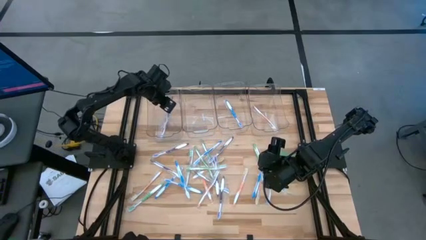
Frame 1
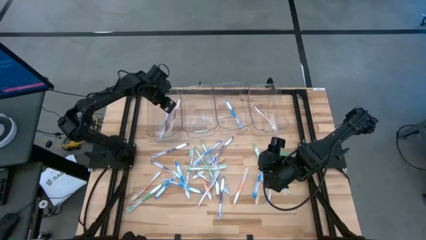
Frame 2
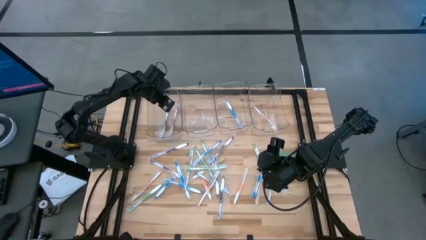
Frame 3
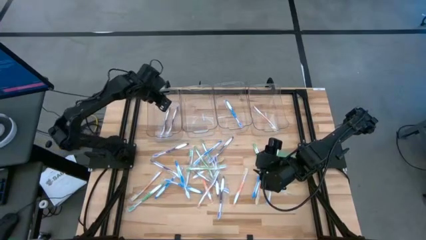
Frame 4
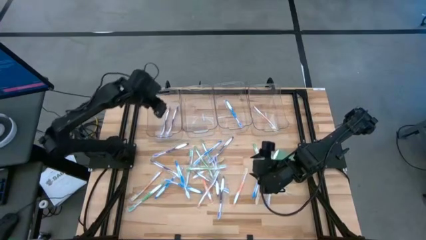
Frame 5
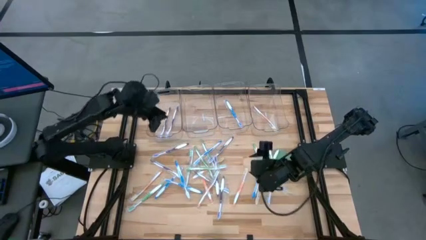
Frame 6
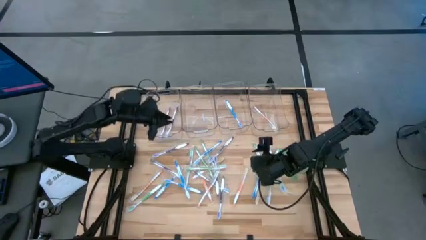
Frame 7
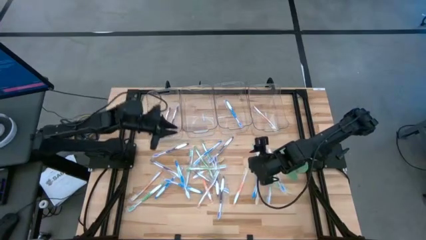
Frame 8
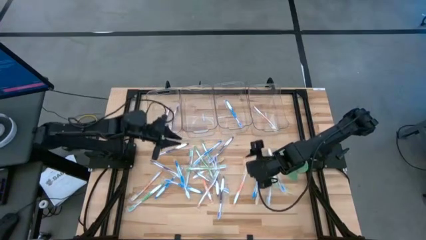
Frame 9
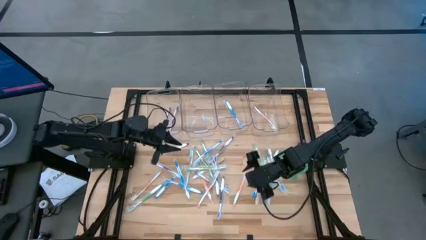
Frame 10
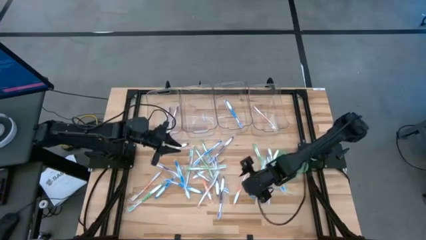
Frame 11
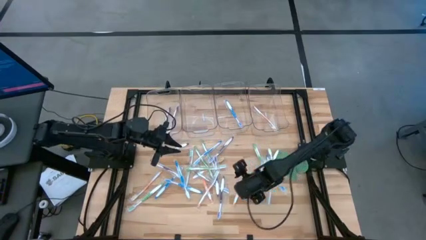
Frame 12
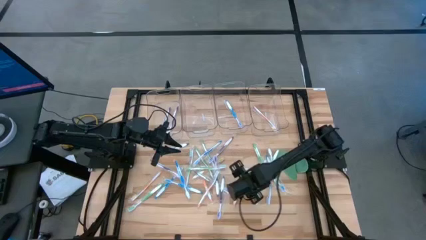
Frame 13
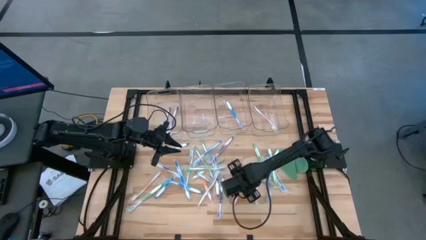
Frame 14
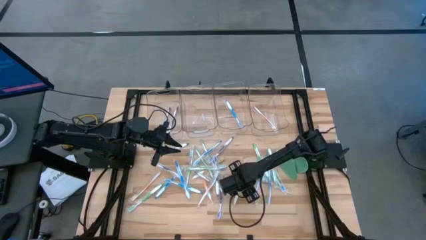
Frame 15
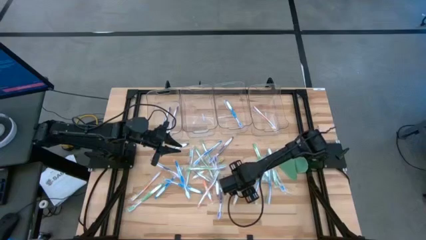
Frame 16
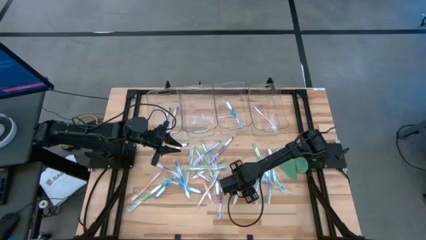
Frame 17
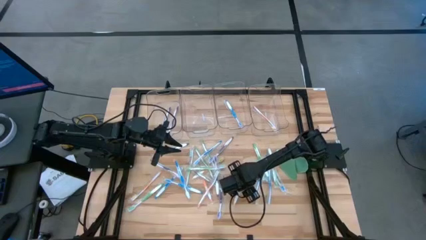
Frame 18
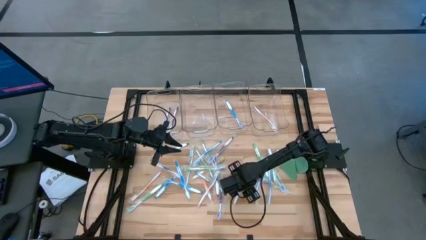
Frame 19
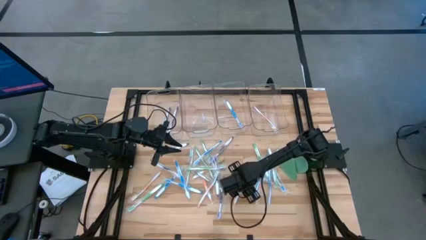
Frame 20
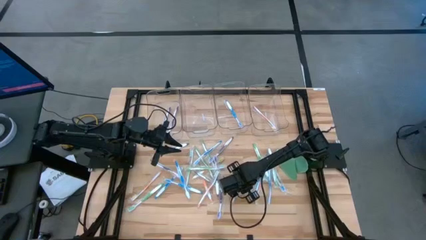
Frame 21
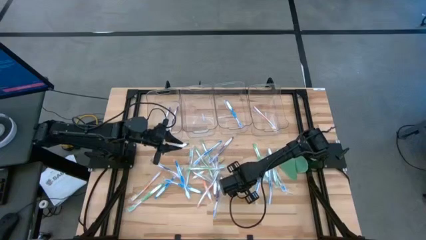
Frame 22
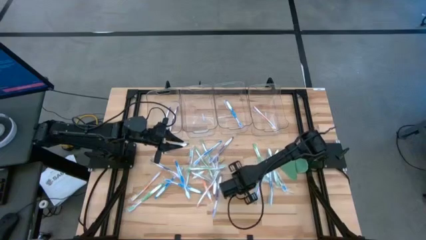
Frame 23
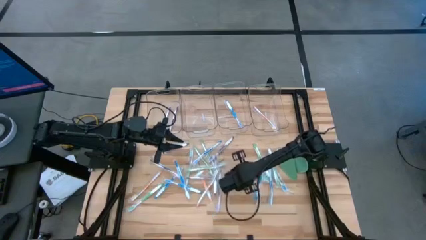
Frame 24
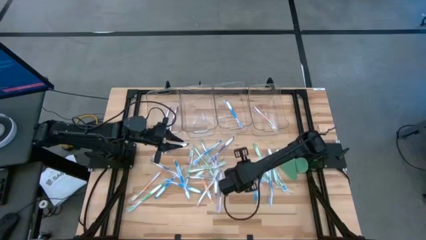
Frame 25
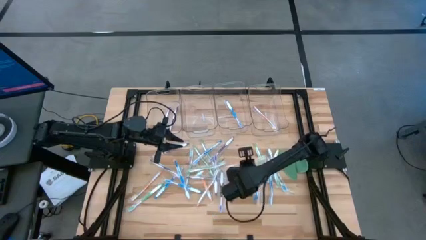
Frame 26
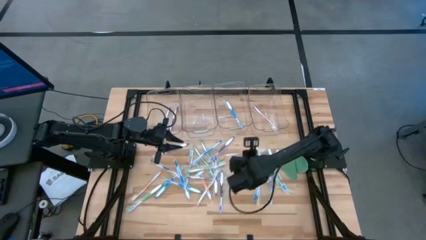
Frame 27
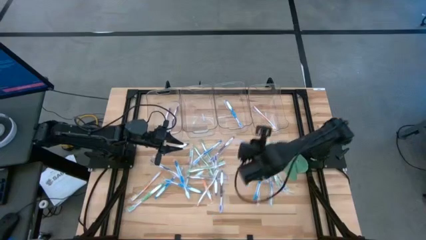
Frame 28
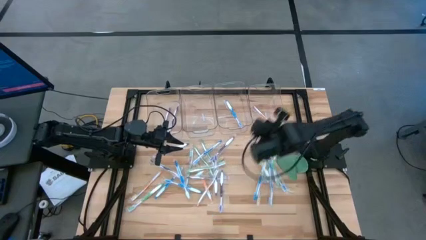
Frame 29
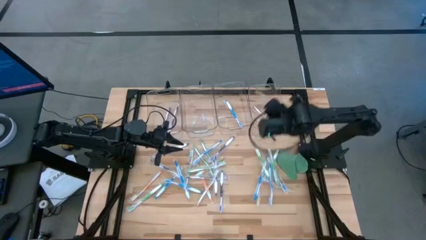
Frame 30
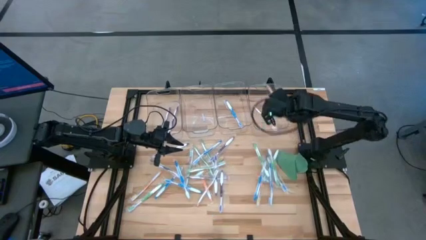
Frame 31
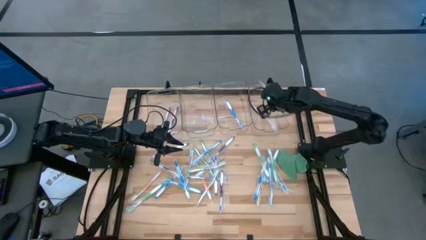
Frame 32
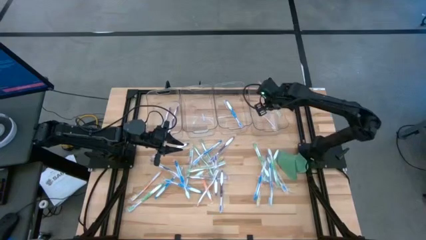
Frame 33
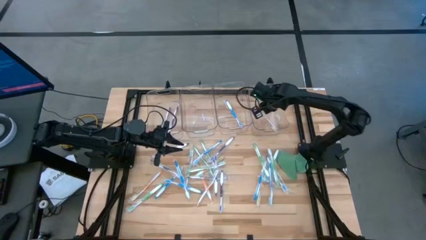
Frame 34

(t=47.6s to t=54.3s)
Task: Pick & Place Toothbrushes
Put the orange toothbrush into the right transparent bin

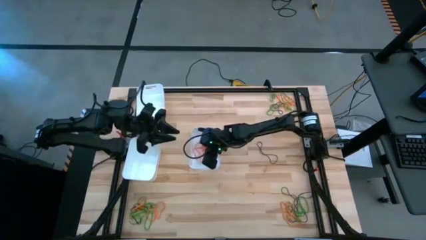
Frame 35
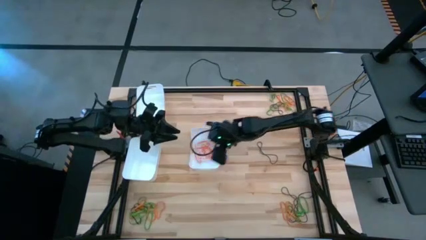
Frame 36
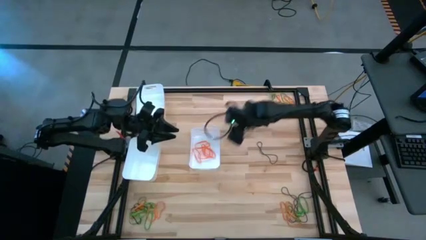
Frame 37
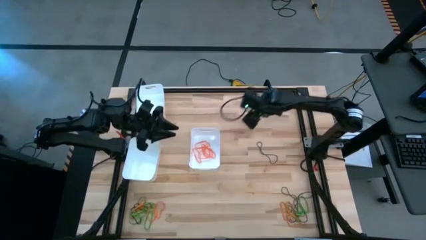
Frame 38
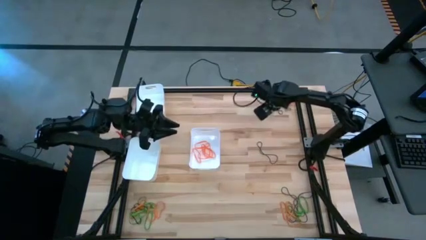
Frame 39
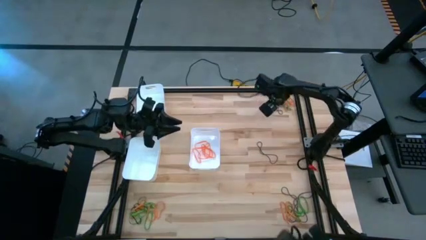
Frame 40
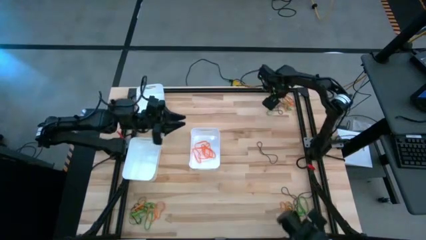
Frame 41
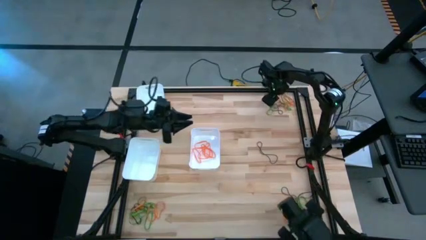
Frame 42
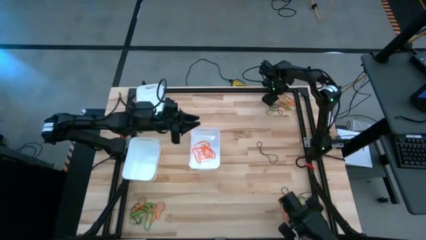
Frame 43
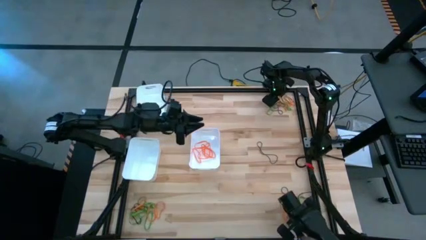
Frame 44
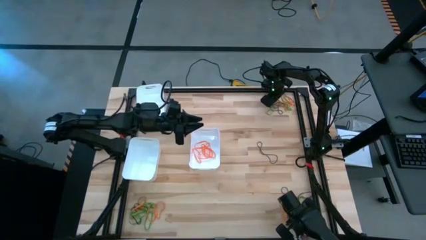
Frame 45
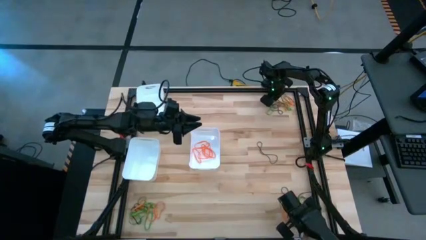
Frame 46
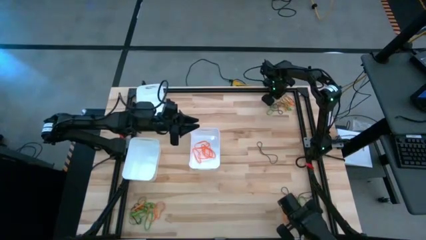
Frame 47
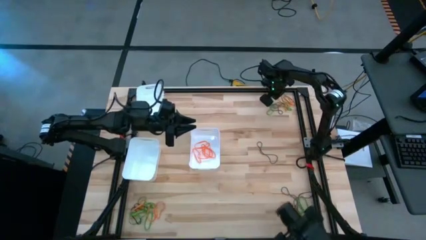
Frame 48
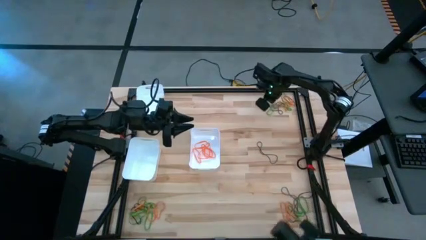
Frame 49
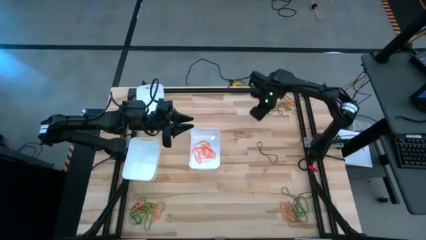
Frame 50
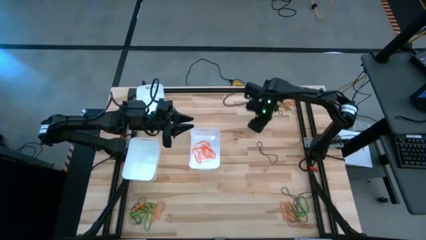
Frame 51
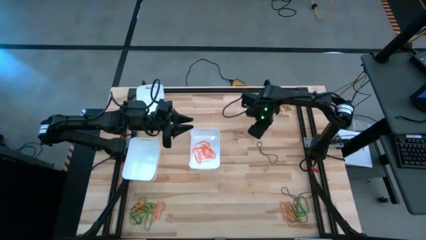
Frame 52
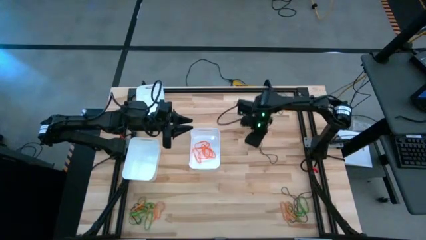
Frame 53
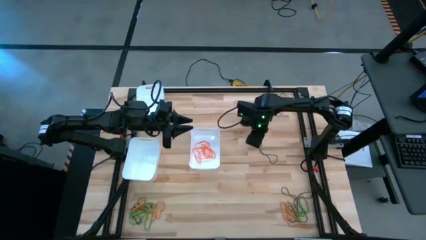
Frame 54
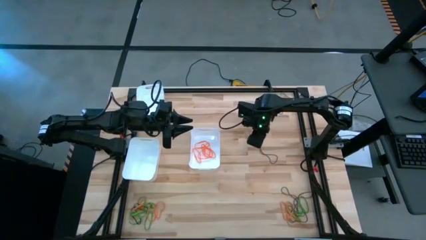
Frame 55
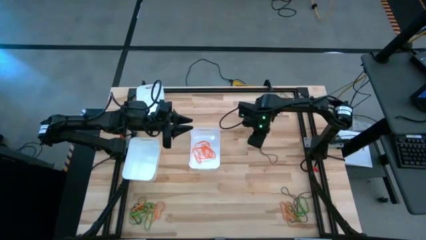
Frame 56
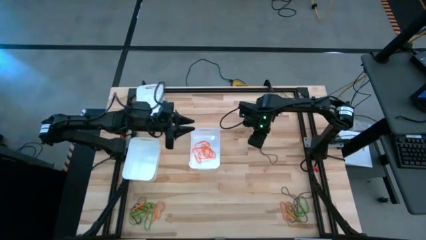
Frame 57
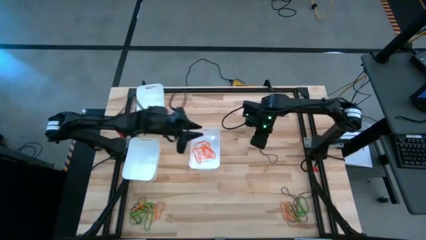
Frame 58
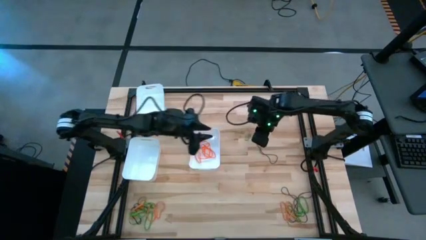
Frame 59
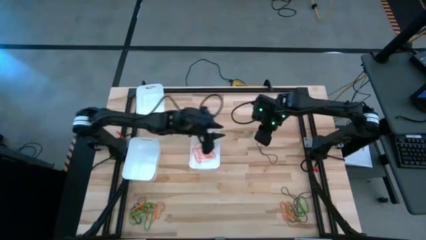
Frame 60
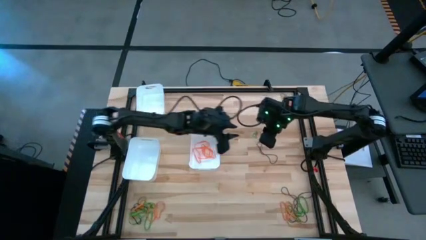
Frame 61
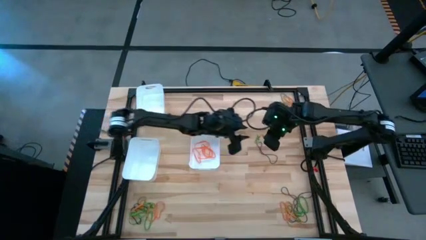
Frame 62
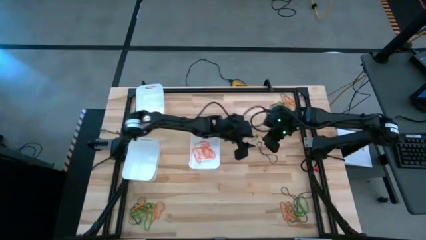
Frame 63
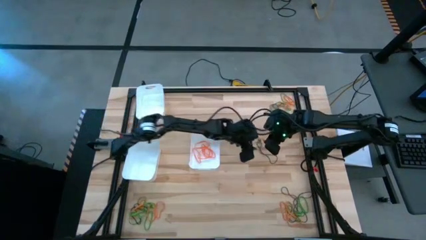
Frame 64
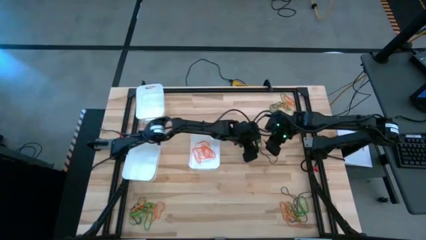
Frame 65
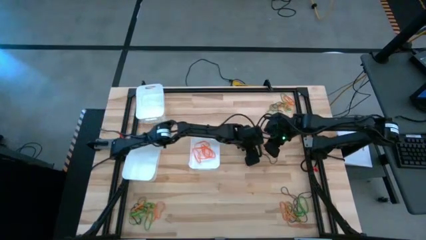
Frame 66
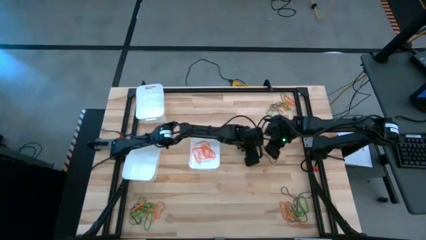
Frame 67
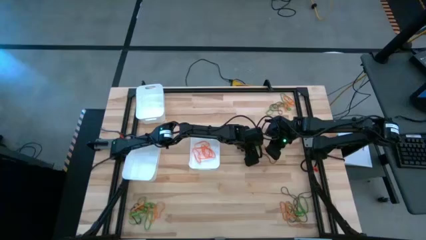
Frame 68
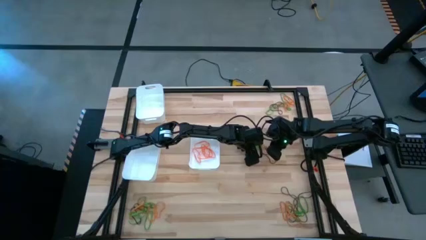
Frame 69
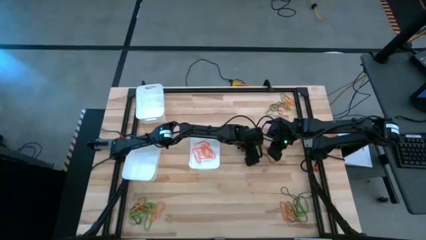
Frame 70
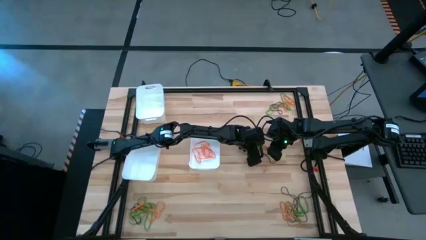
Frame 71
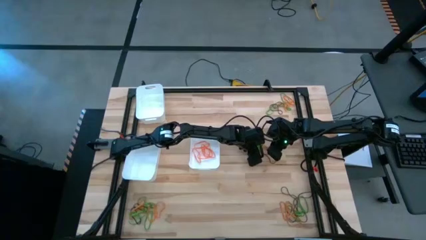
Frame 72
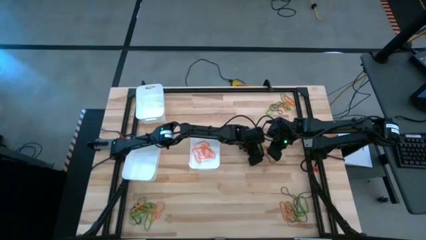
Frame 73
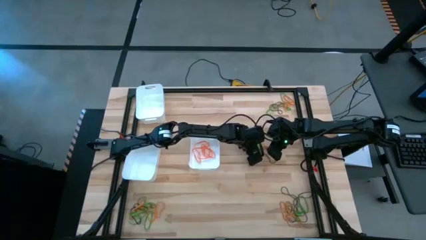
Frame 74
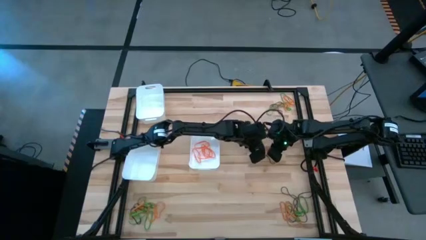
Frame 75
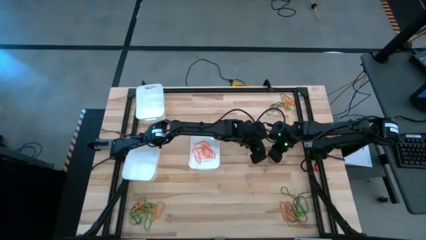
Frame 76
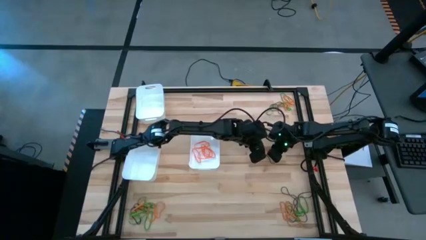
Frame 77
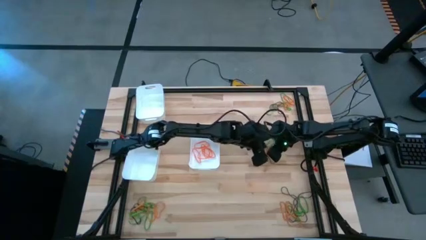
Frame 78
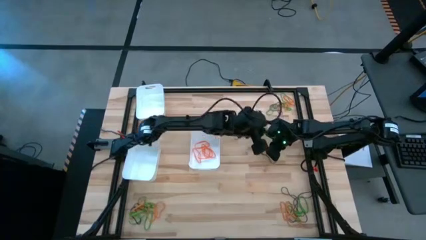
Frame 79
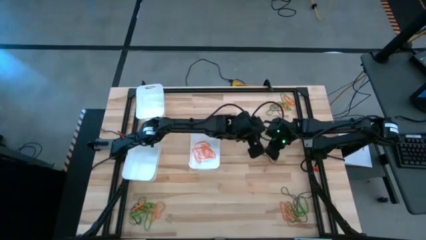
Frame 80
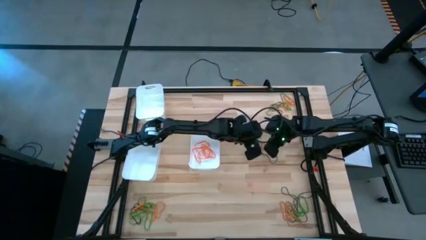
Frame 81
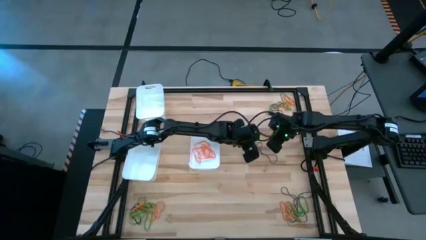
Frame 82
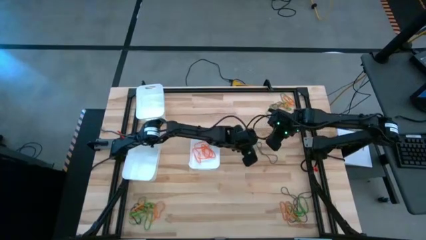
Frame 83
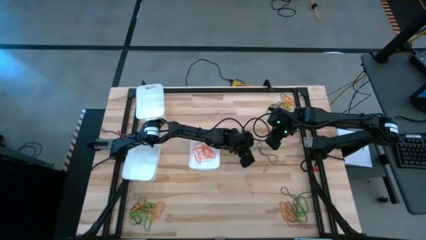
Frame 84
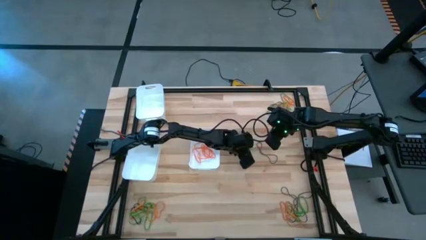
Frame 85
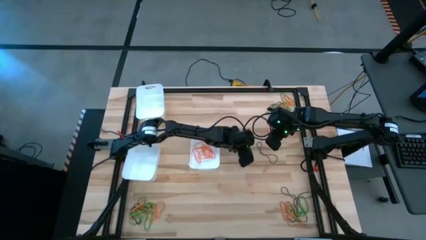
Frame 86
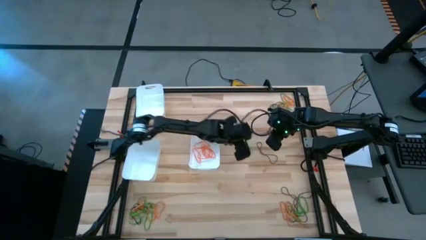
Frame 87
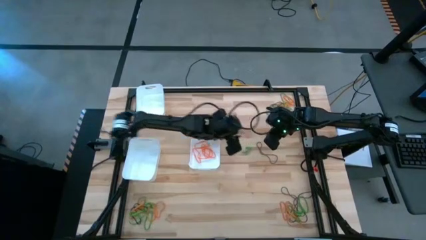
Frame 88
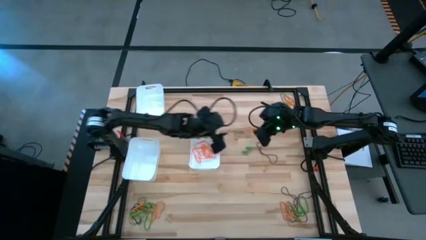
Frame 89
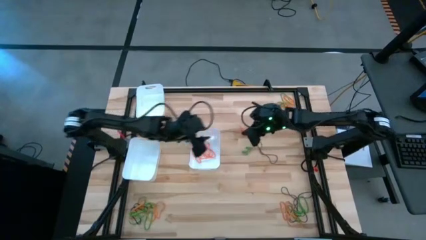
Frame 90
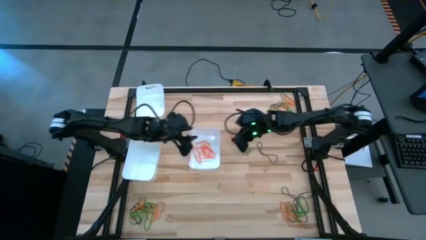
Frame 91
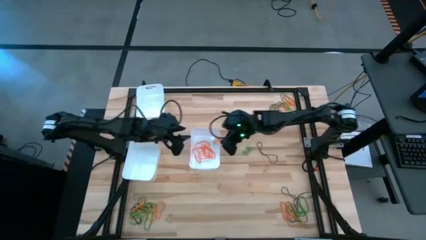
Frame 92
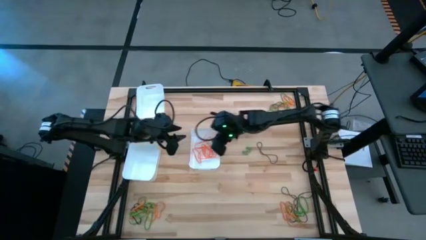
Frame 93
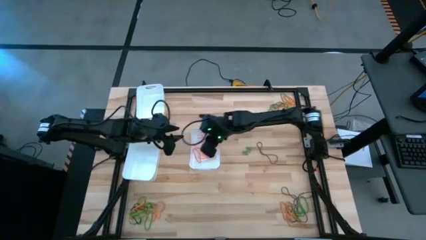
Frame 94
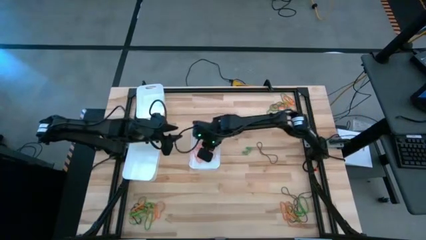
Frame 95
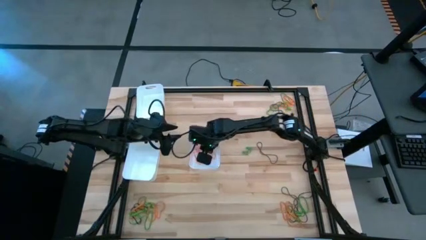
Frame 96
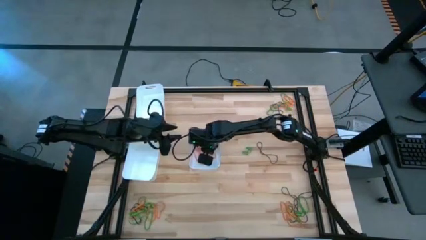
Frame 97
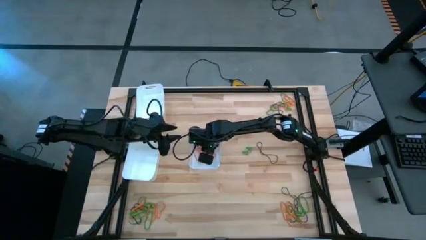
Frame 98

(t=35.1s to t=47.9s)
Task: Sort rubber bands into baskets
Put the orange rubber band into the bottom right white bin
